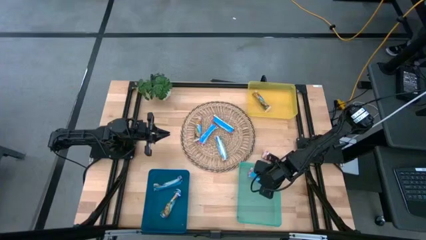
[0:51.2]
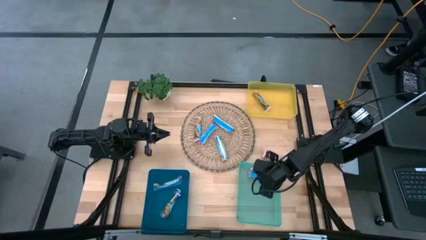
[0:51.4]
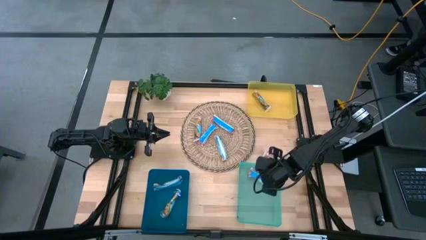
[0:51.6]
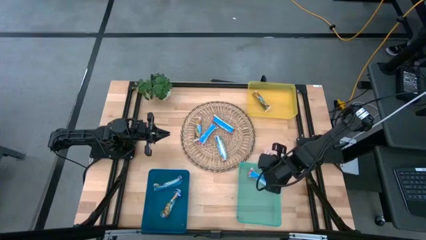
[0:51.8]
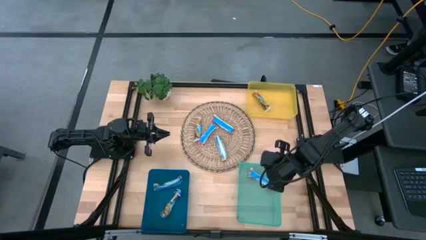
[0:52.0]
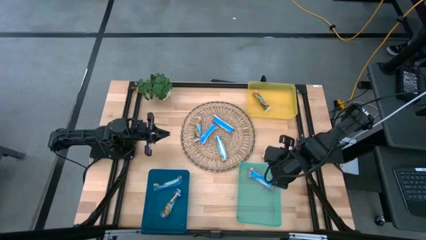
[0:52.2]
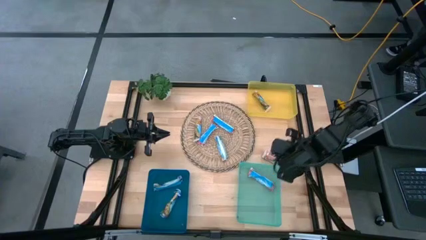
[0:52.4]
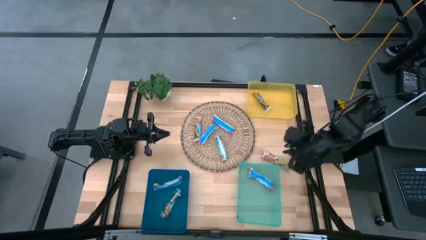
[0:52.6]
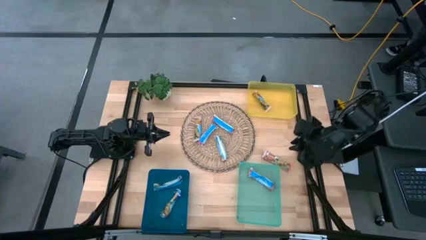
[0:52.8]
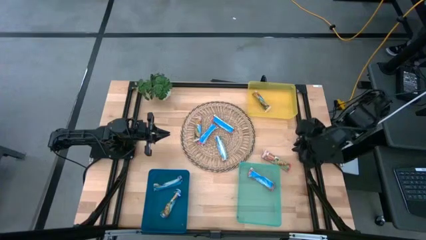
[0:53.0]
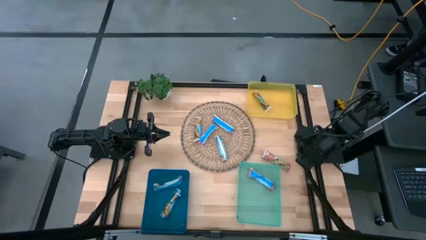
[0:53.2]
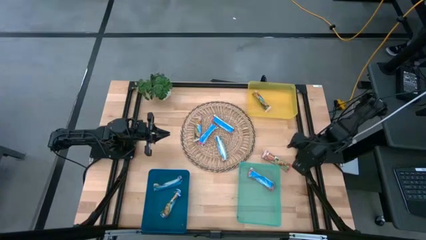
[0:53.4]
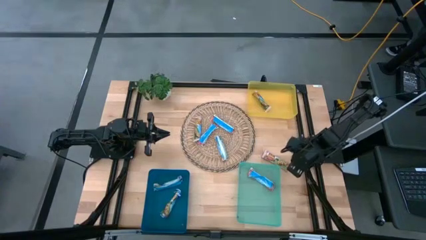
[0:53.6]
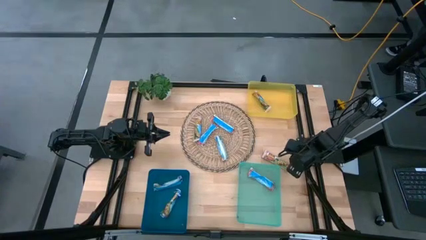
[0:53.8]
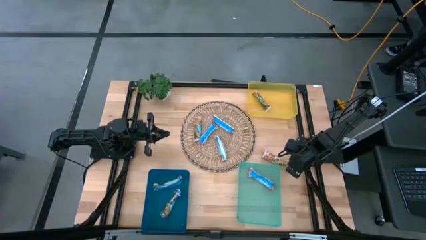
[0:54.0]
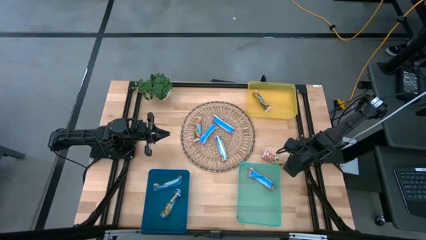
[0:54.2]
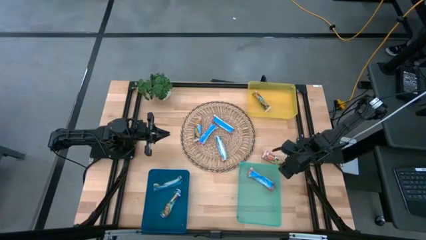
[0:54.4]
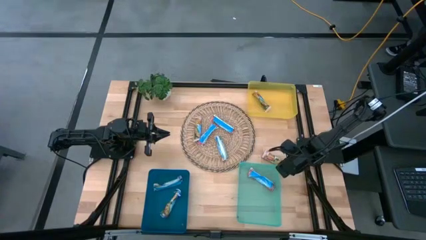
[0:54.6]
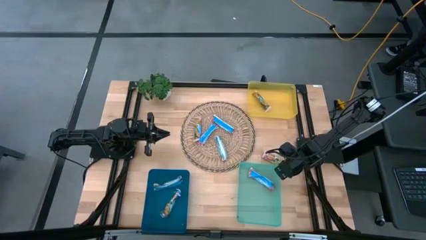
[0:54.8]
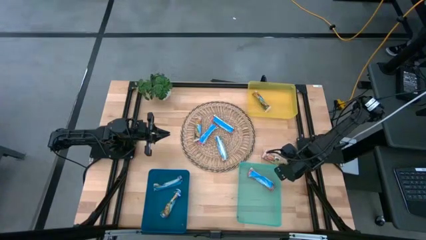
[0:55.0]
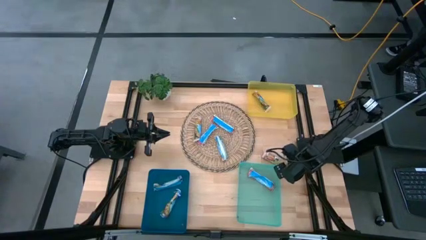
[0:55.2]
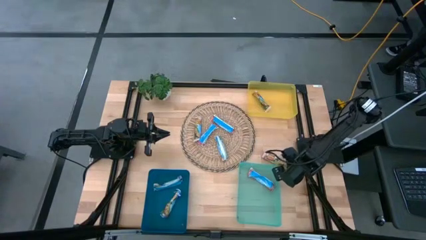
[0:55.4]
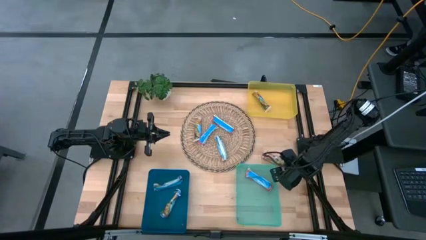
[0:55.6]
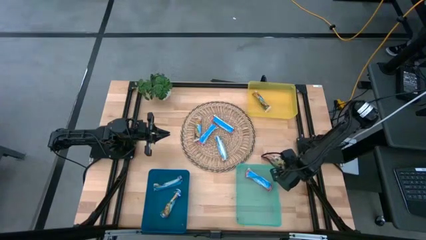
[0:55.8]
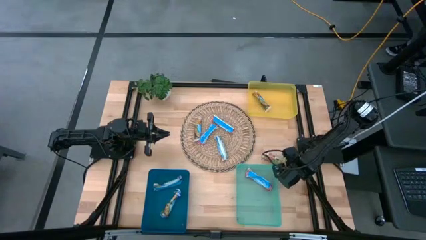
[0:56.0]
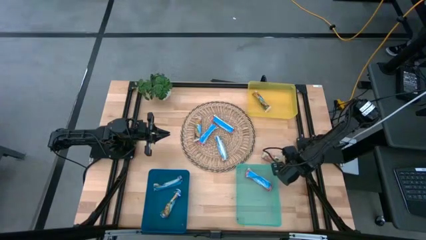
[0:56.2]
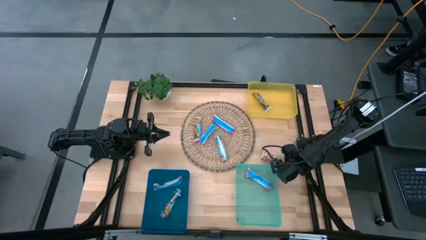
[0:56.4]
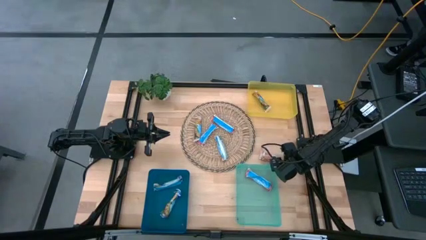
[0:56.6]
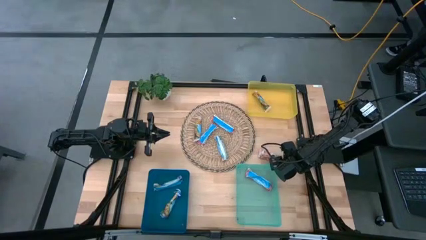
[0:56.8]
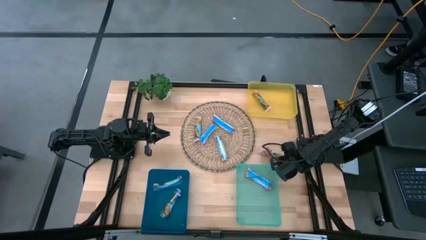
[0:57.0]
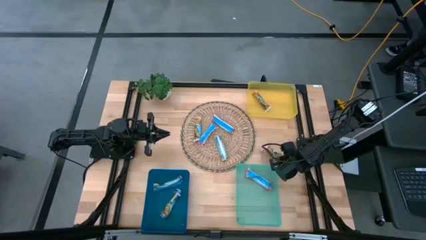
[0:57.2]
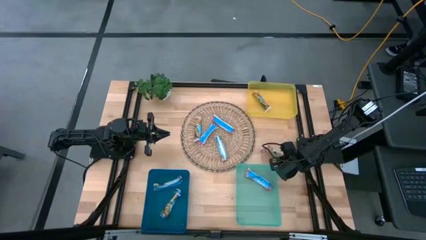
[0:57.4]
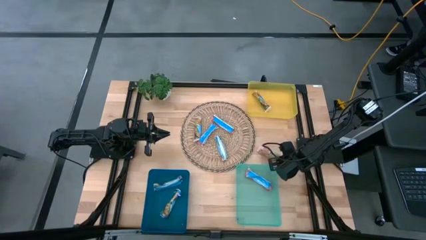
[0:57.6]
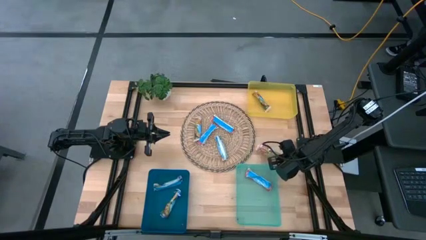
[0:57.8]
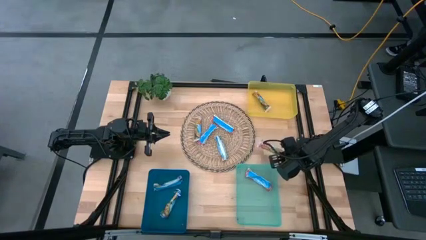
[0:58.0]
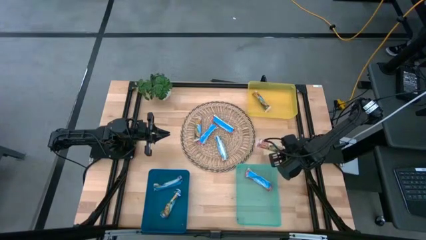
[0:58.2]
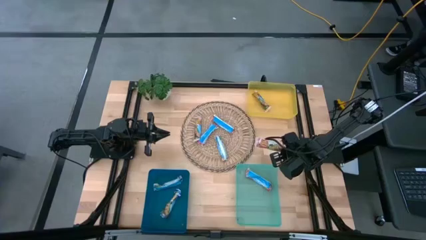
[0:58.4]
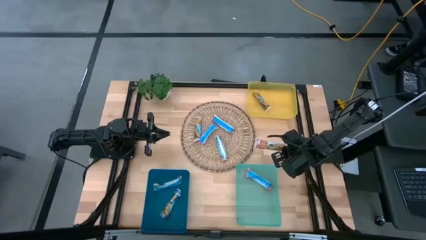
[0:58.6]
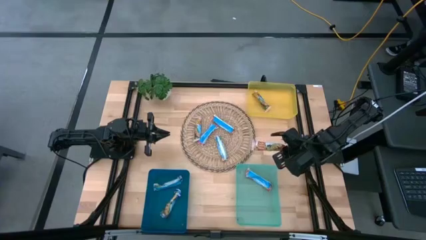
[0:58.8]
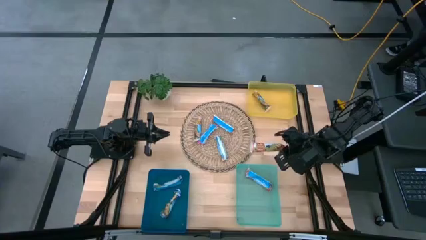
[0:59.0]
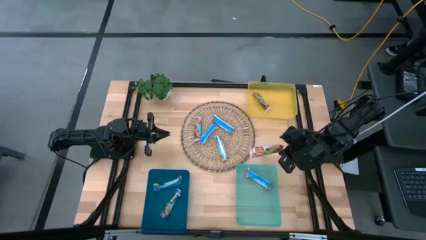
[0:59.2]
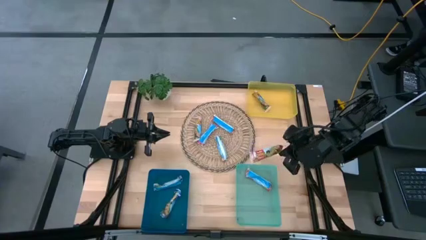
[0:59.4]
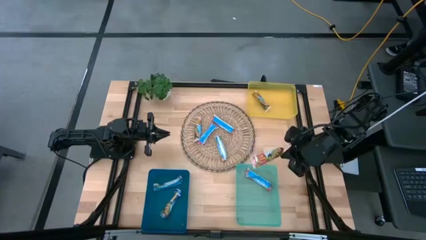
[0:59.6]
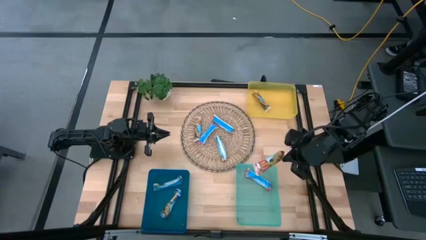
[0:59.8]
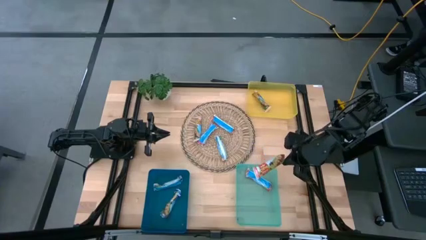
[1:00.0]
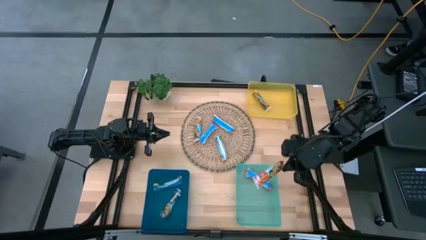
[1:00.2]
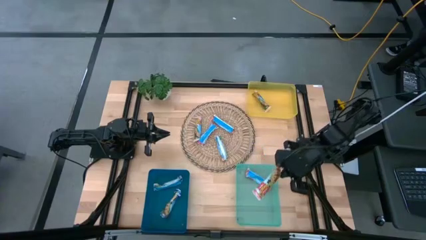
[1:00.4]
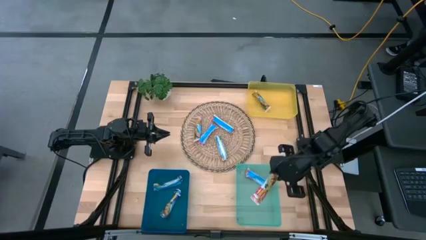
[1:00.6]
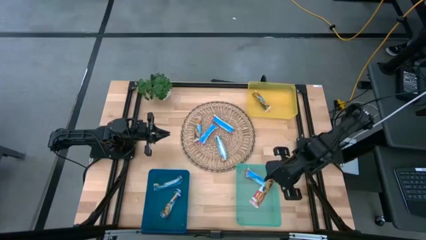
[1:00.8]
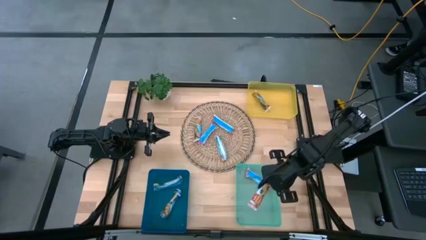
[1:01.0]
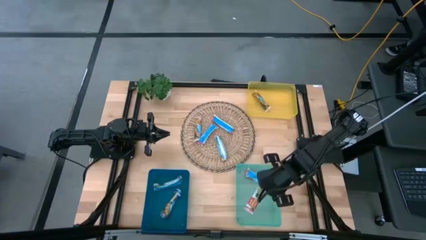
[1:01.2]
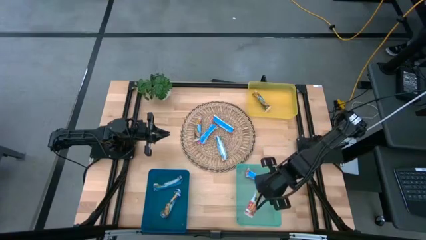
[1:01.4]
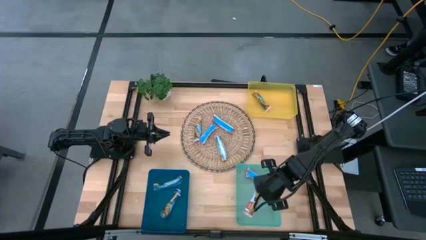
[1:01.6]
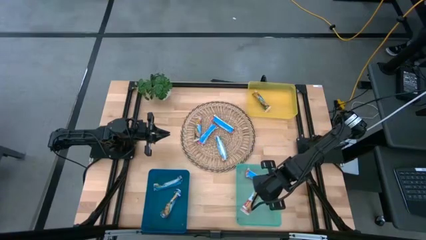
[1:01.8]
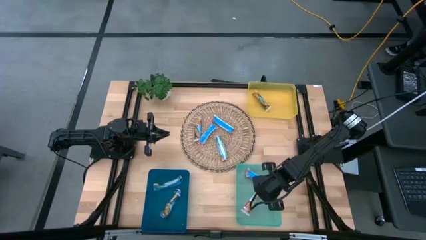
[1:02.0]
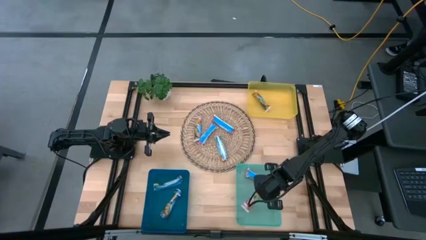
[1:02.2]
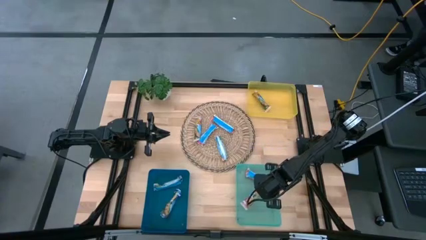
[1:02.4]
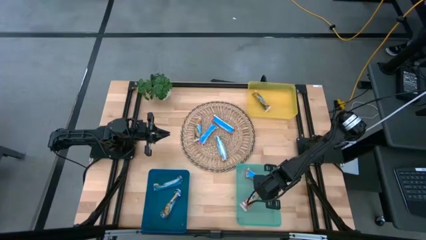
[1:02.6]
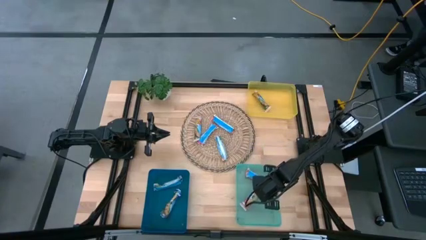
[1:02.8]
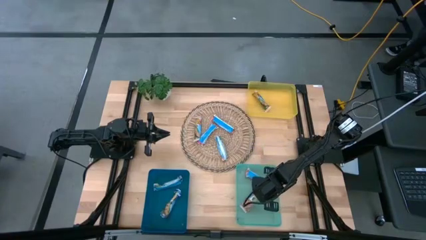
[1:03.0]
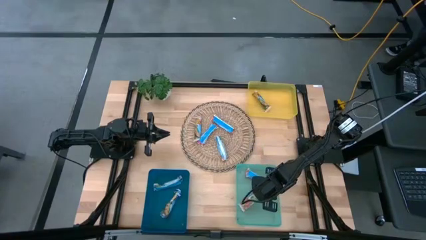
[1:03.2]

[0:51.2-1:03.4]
Task: Pick and place Granola Bars by type
Put the red granola bar into the green bin
